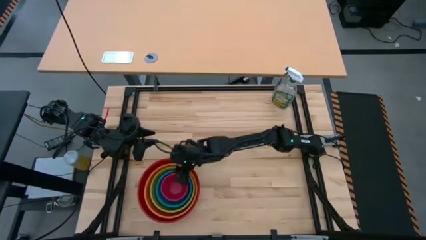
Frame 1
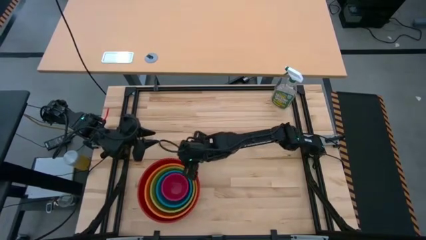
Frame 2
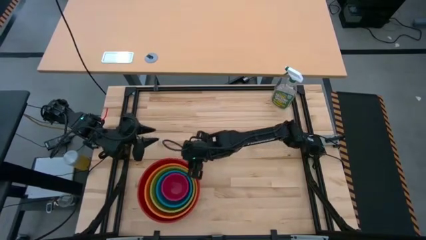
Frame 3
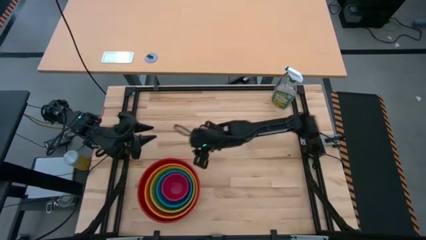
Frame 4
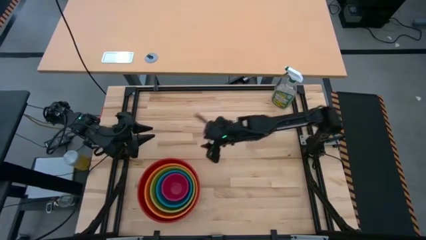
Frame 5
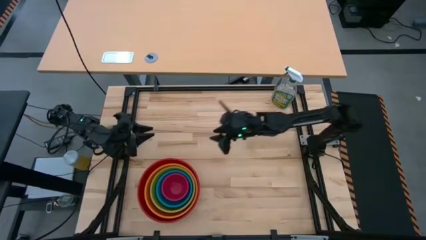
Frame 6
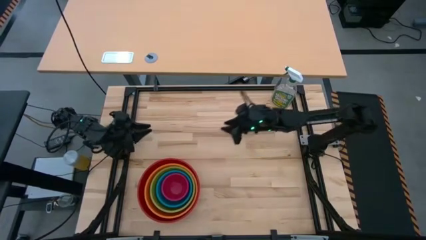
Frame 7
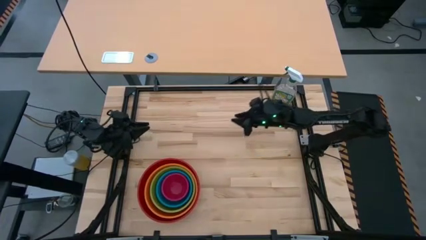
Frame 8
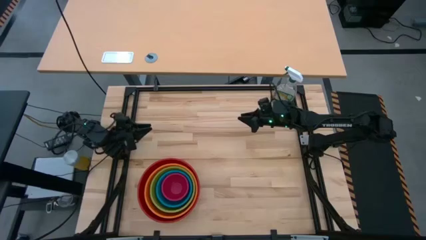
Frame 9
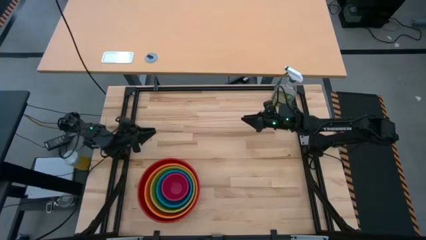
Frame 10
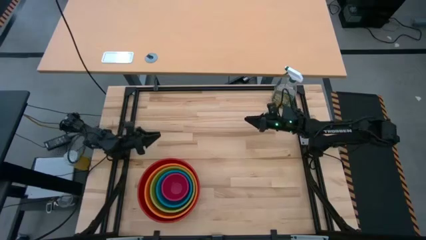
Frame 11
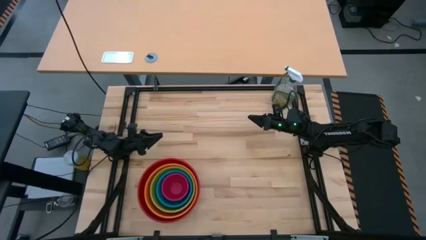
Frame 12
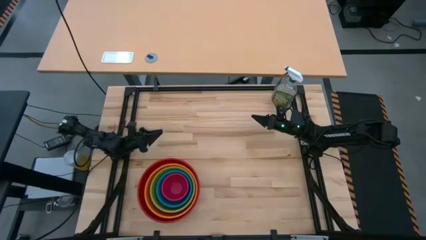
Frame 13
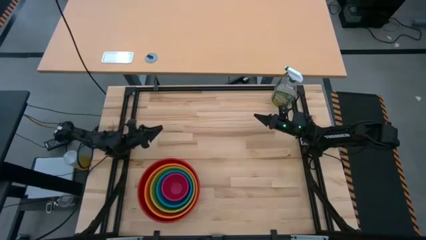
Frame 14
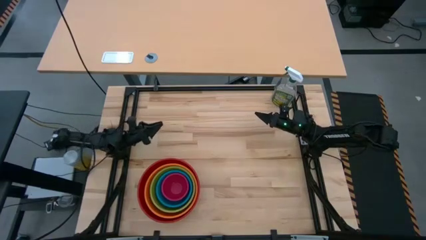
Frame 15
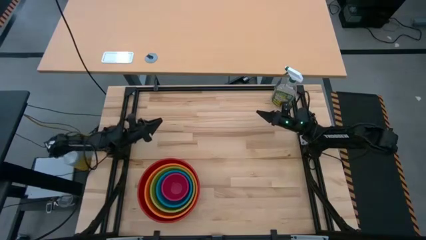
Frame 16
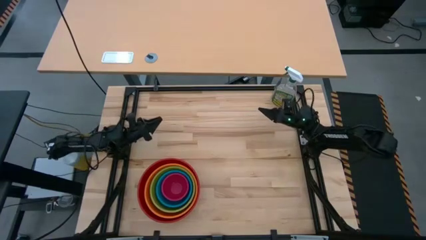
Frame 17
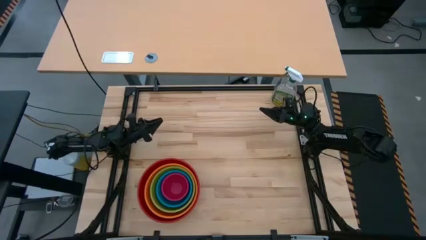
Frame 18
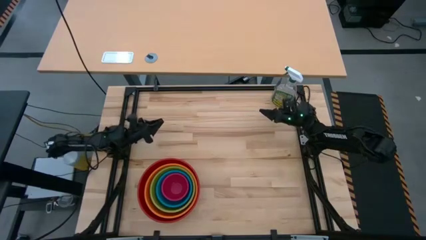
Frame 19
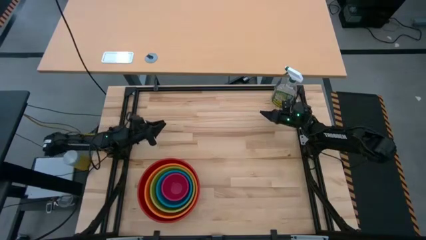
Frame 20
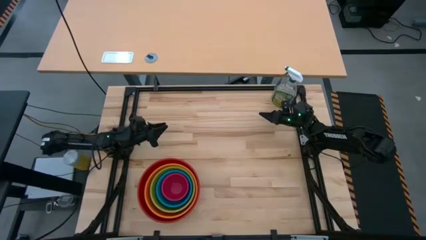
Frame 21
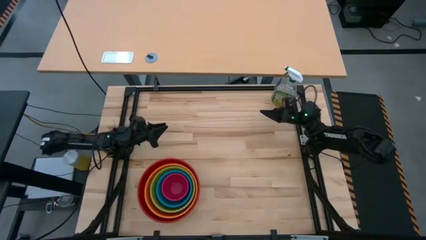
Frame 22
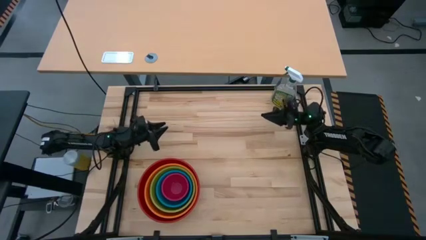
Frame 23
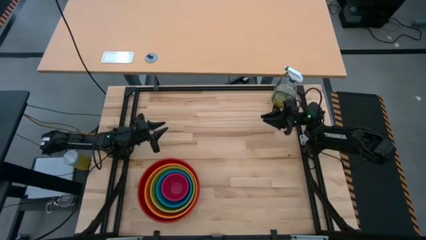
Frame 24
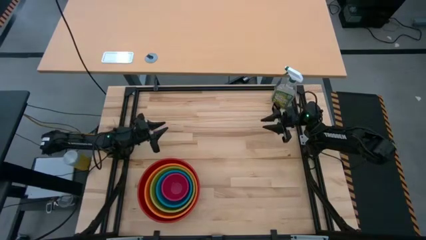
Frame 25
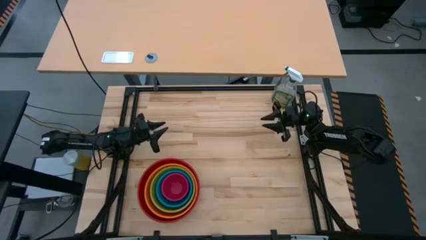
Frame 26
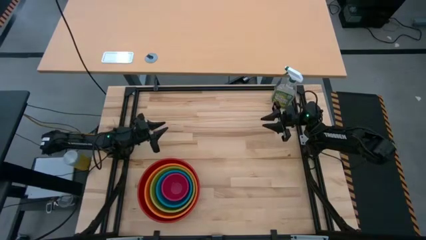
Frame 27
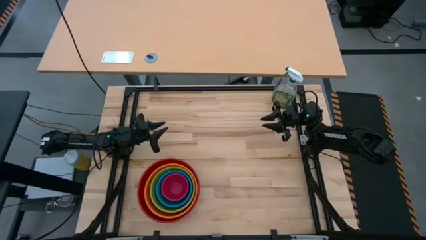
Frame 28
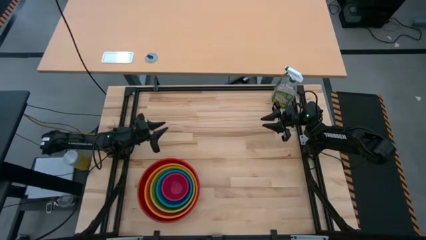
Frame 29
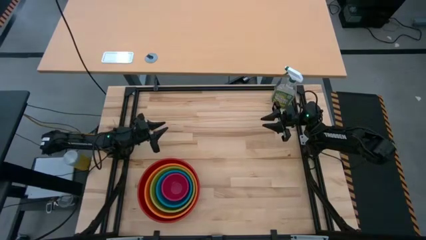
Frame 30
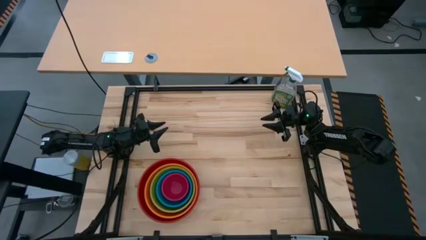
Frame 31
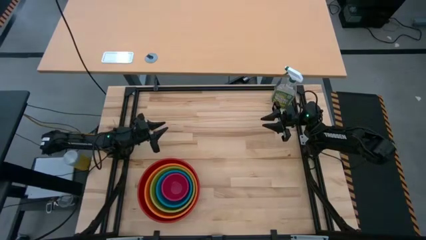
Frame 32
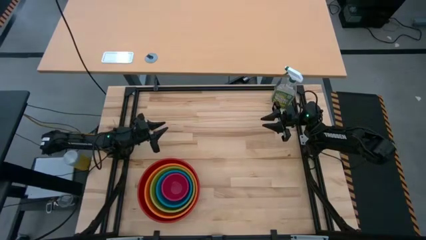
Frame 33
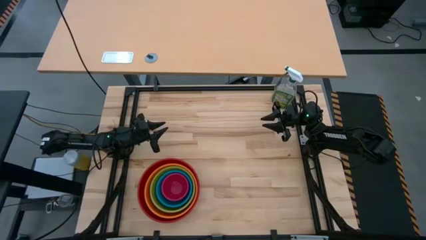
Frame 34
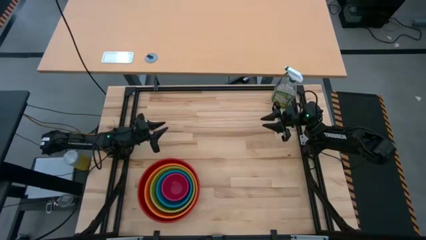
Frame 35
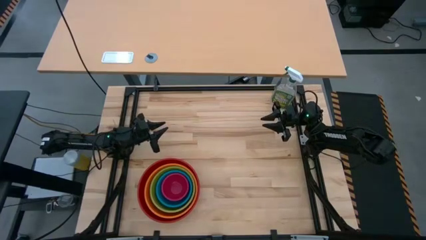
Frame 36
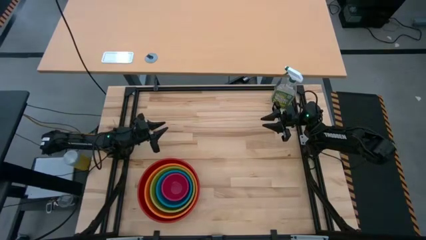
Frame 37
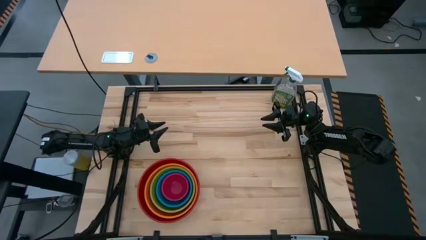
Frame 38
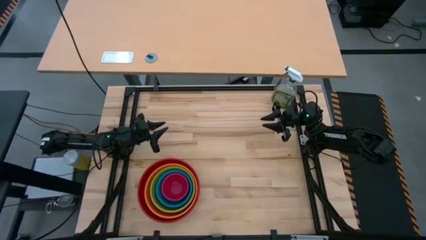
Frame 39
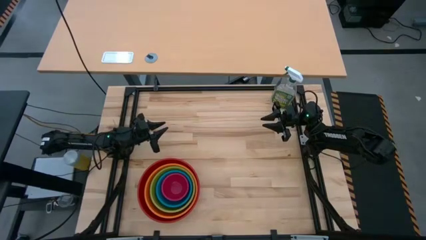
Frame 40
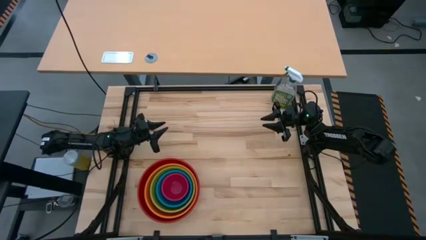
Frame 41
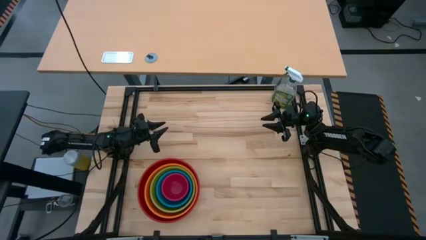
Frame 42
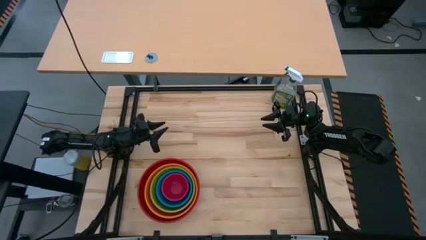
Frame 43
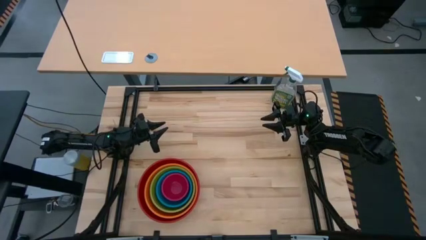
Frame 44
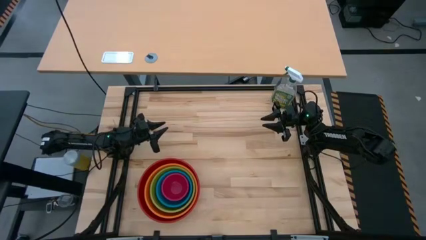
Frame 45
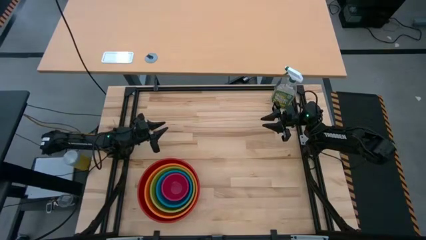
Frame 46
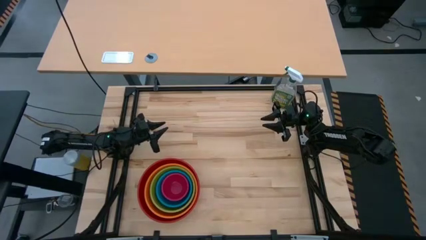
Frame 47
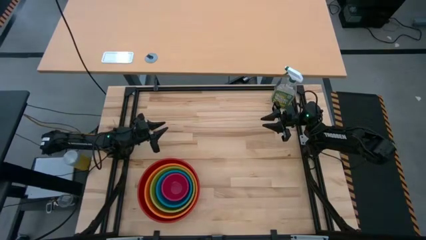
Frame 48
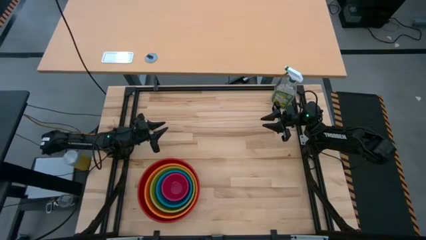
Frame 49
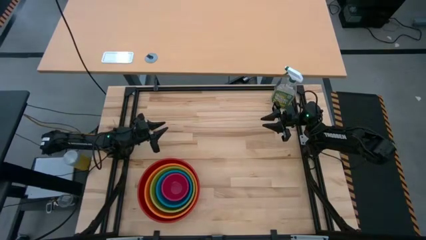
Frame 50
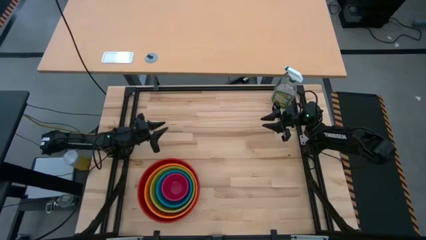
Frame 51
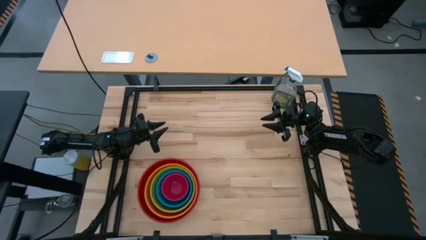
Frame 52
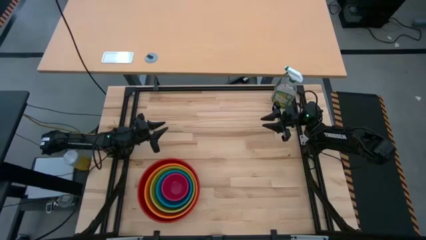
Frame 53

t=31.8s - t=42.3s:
Return to Home Position

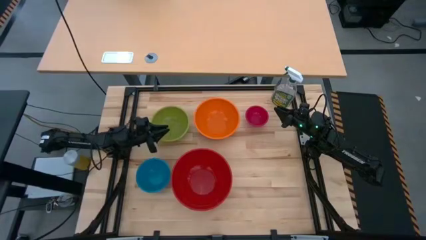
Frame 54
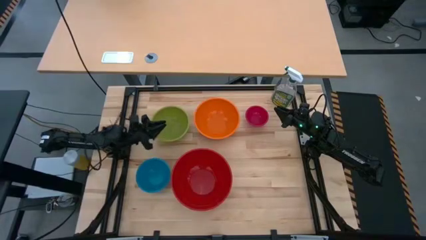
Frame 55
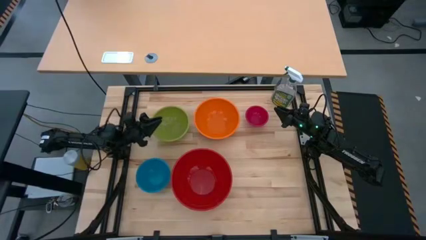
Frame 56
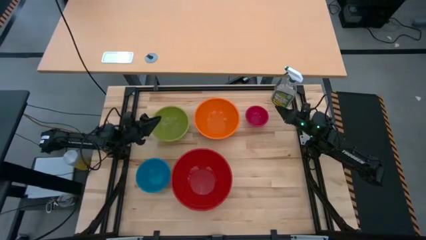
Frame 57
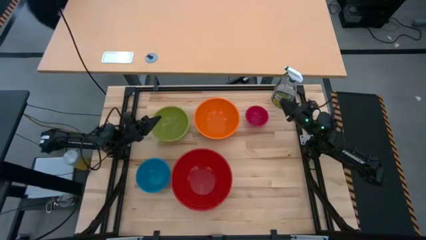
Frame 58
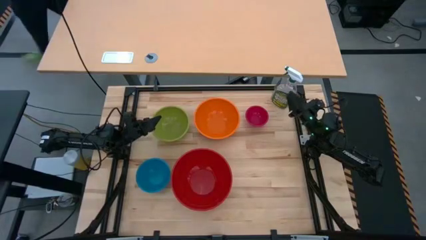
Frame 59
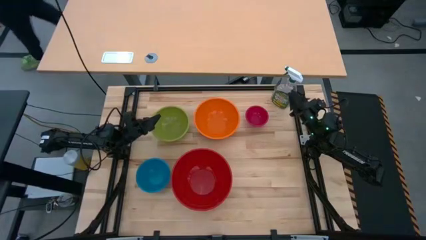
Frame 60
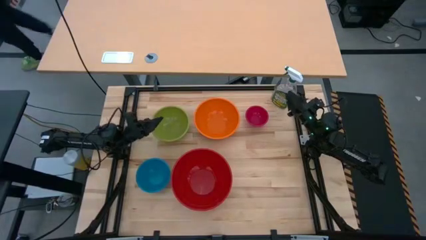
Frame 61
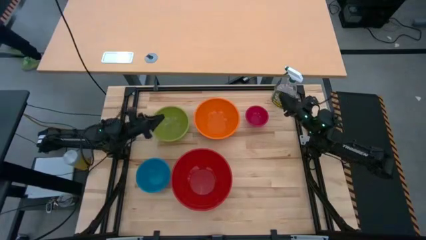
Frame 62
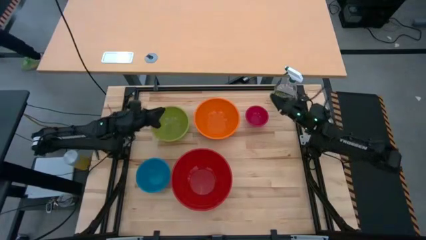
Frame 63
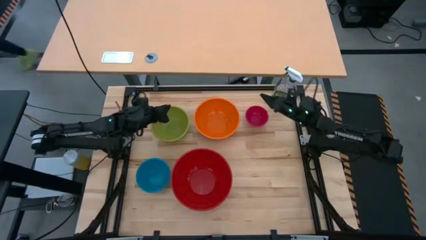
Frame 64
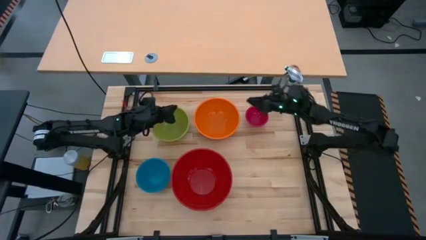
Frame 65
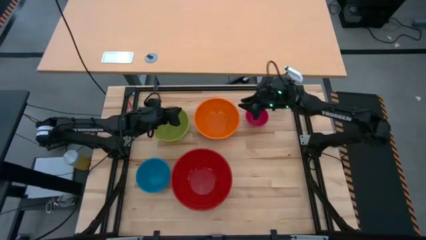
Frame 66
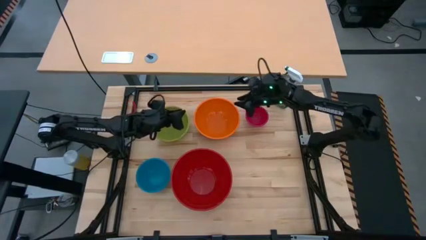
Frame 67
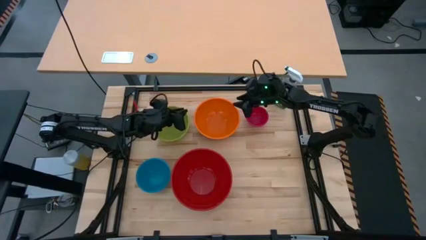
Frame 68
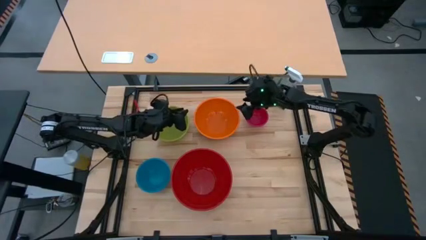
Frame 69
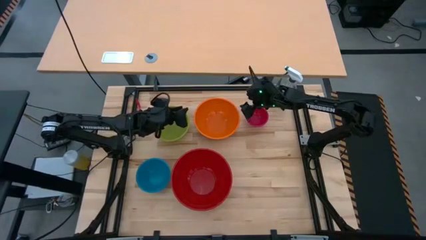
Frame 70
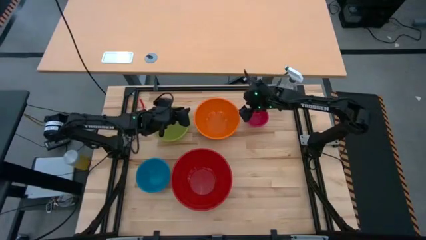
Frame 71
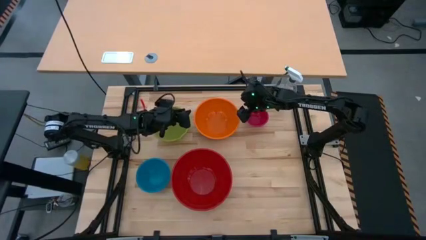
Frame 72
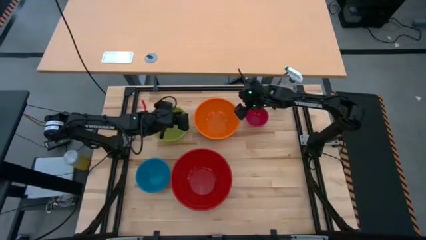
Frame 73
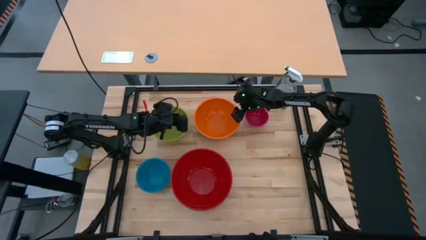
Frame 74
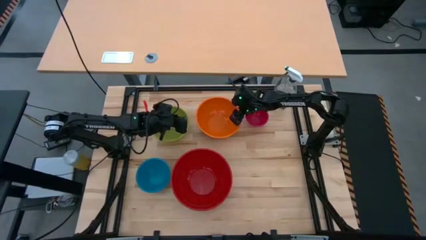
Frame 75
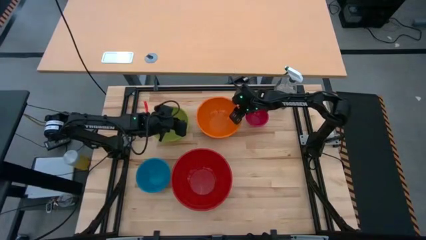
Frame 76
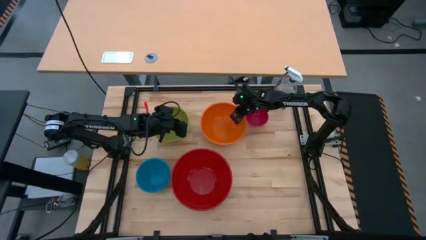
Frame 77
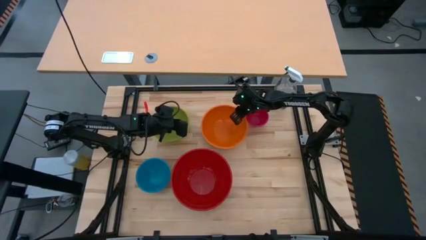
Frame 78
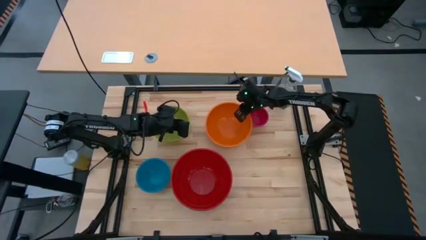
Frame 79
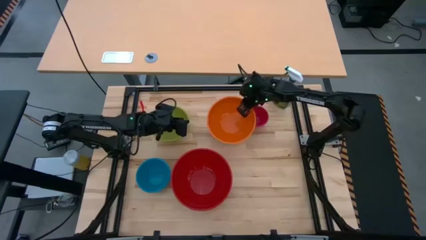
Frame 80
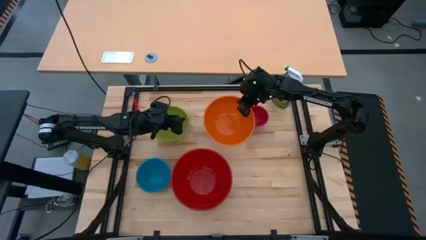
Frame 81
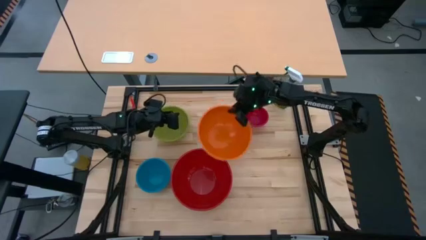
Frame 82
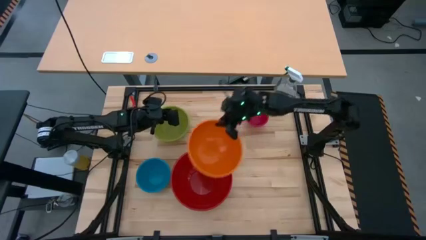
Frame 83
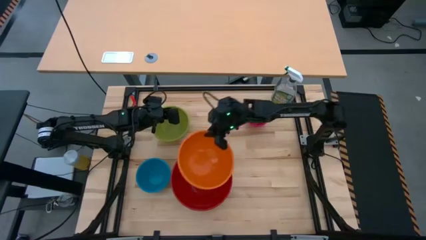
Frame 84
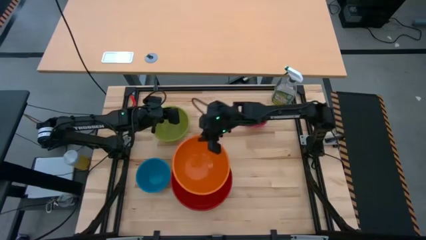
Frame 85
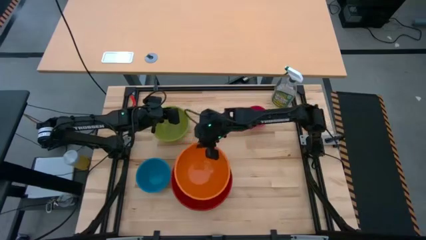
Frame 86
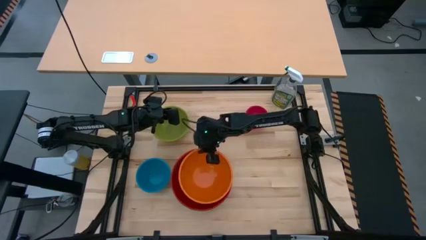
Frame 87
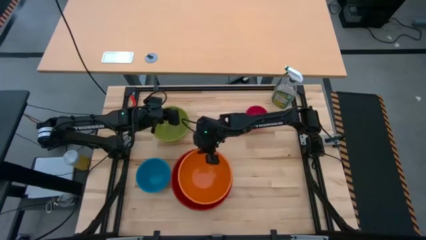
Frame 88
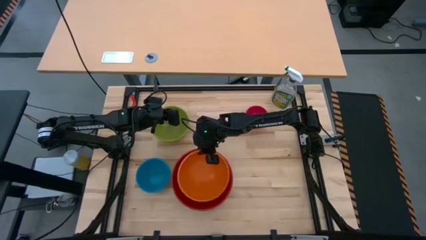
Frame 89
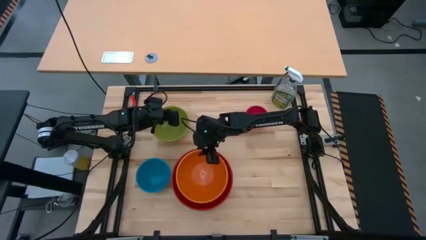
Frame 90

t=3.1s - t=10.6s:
Stack the orange bowl on top of the red bowl
